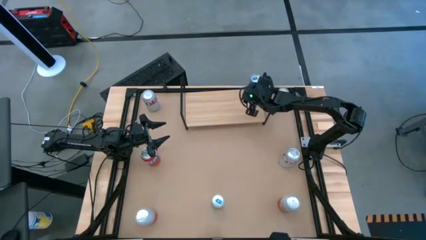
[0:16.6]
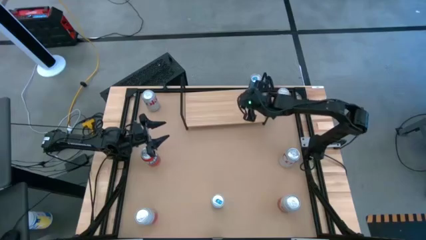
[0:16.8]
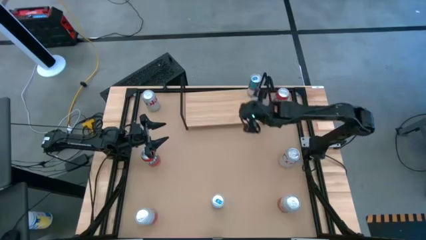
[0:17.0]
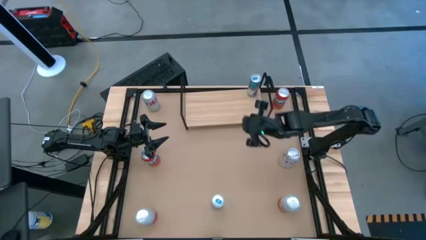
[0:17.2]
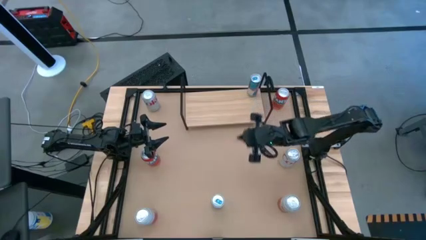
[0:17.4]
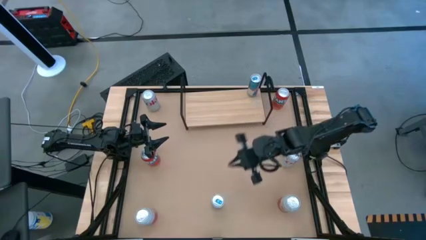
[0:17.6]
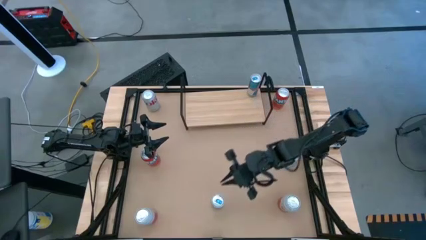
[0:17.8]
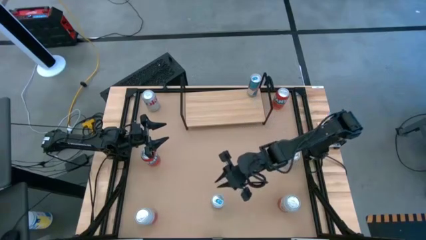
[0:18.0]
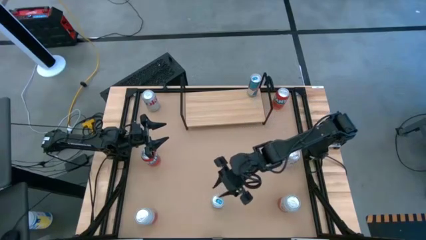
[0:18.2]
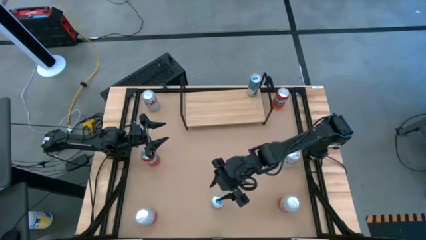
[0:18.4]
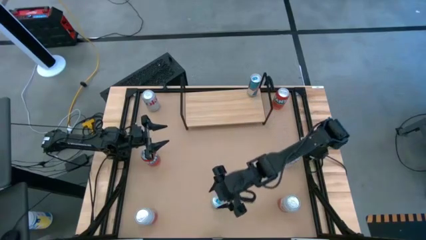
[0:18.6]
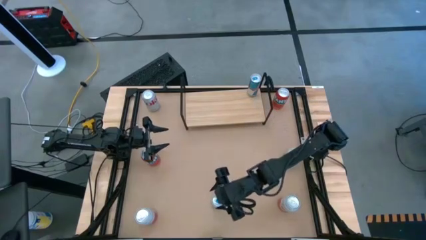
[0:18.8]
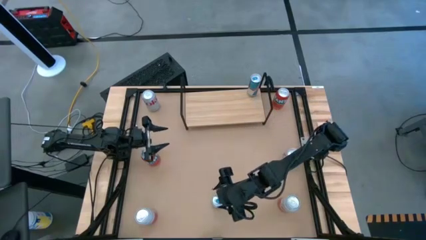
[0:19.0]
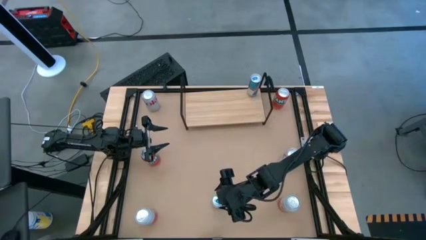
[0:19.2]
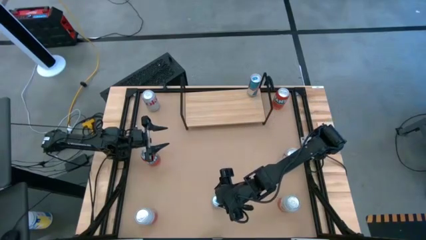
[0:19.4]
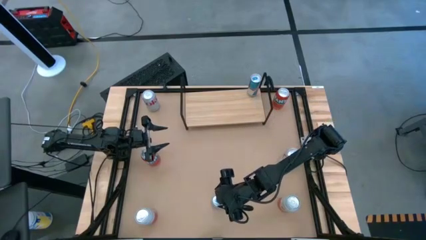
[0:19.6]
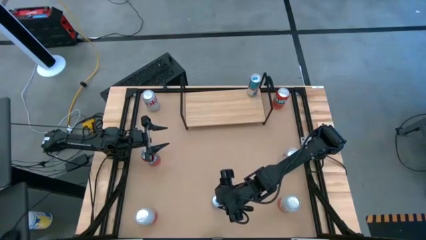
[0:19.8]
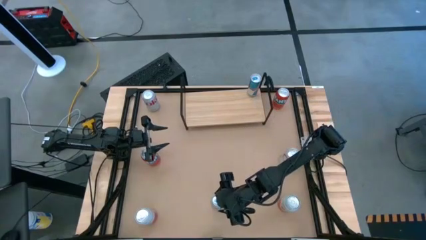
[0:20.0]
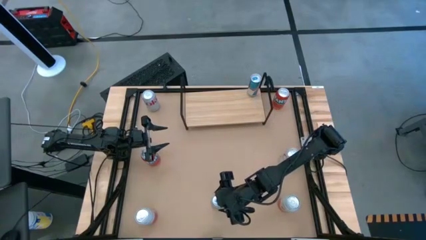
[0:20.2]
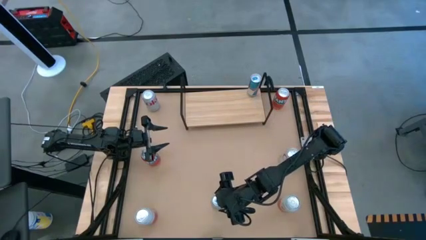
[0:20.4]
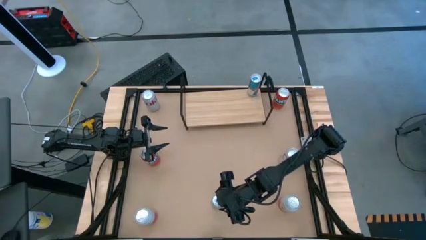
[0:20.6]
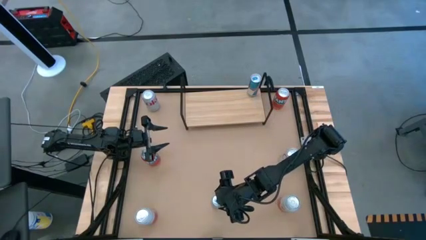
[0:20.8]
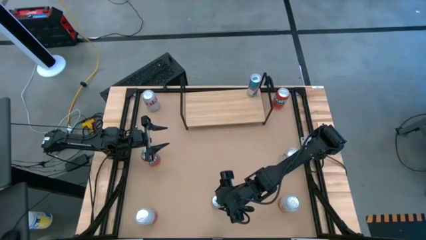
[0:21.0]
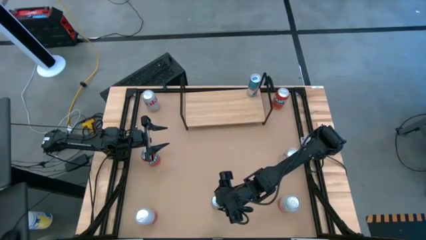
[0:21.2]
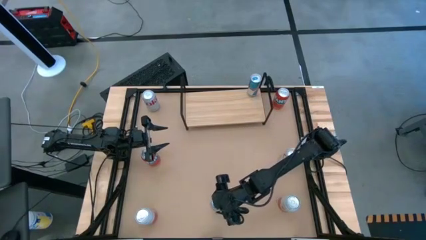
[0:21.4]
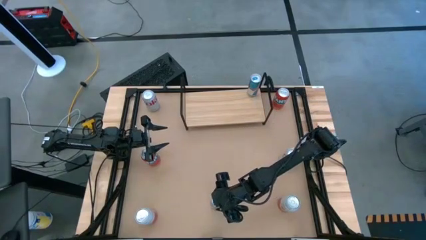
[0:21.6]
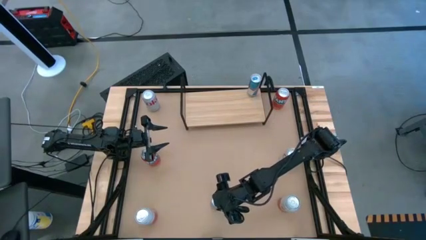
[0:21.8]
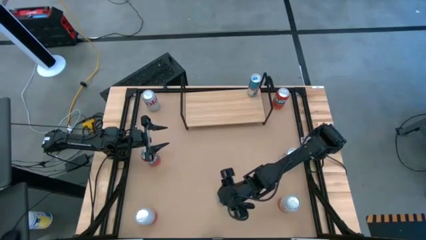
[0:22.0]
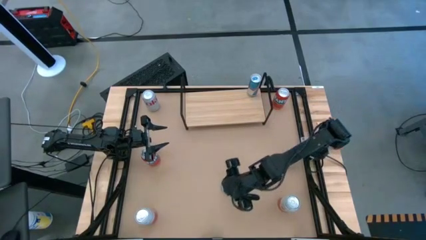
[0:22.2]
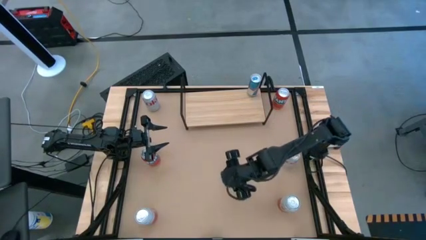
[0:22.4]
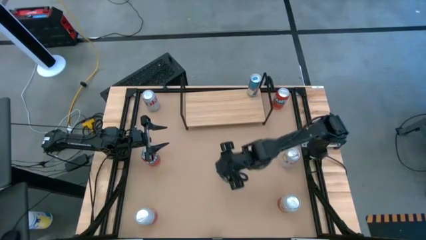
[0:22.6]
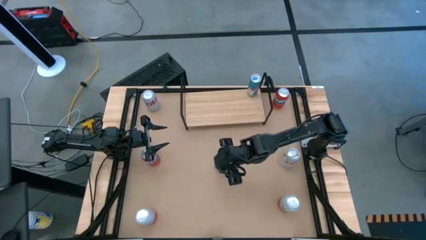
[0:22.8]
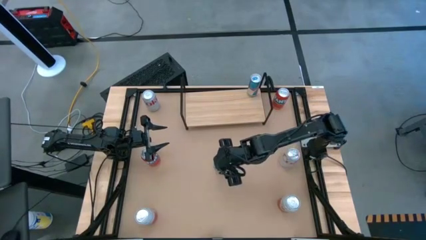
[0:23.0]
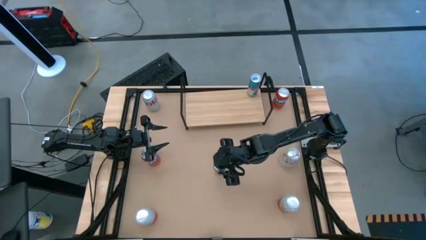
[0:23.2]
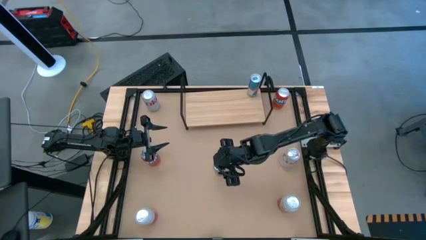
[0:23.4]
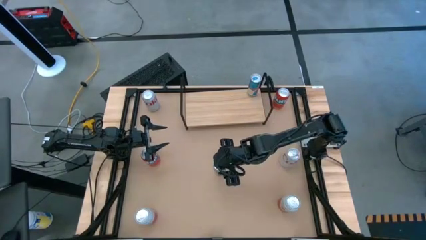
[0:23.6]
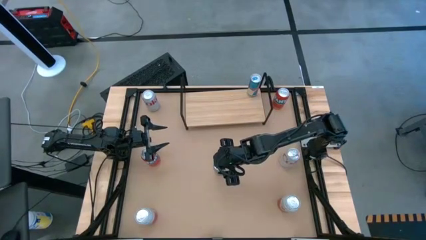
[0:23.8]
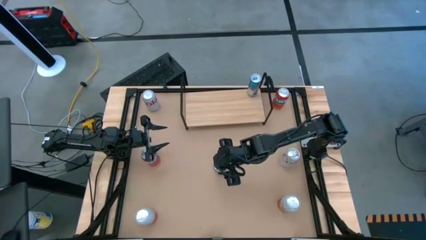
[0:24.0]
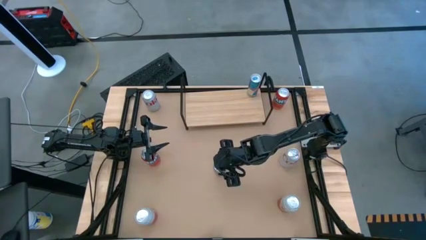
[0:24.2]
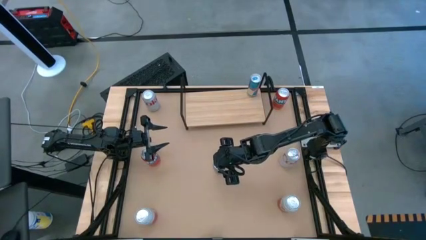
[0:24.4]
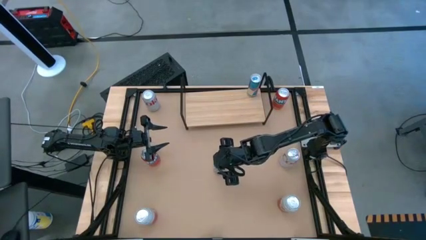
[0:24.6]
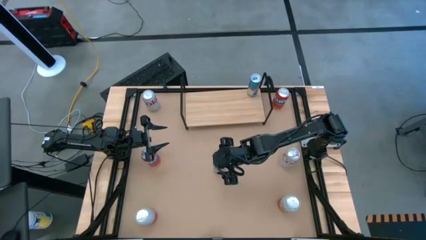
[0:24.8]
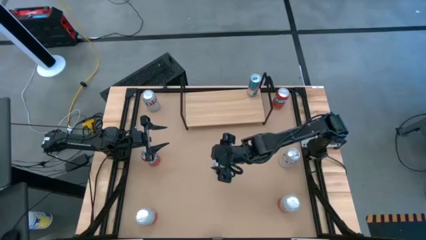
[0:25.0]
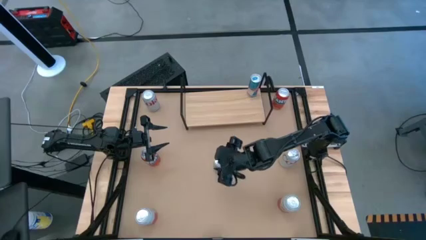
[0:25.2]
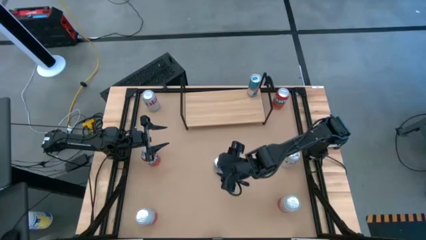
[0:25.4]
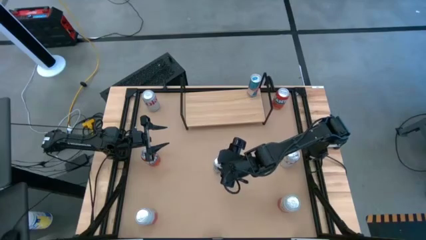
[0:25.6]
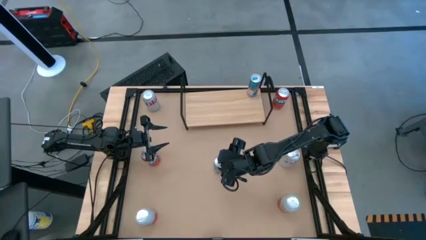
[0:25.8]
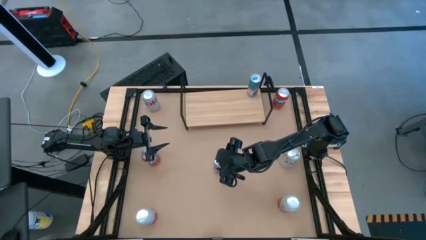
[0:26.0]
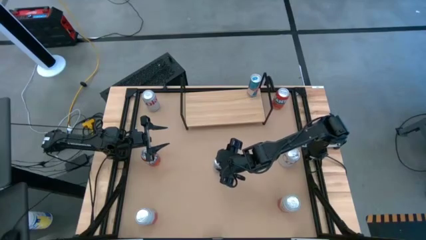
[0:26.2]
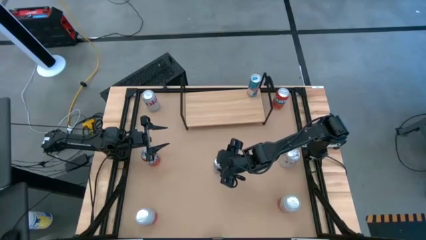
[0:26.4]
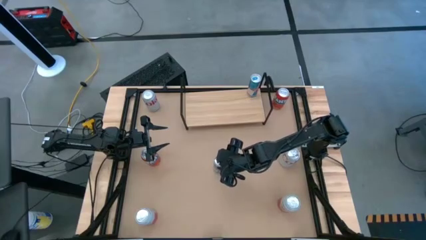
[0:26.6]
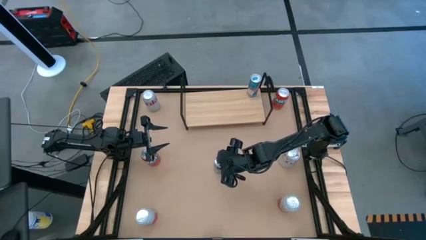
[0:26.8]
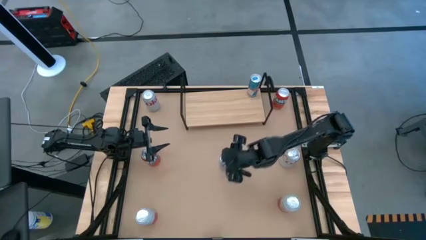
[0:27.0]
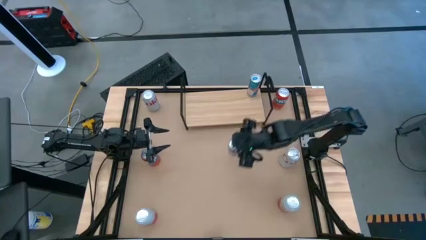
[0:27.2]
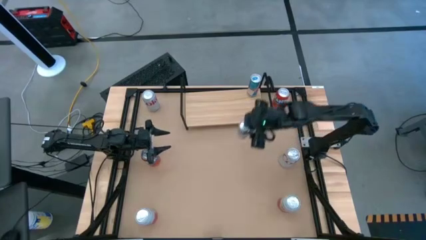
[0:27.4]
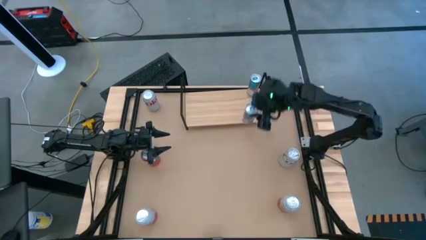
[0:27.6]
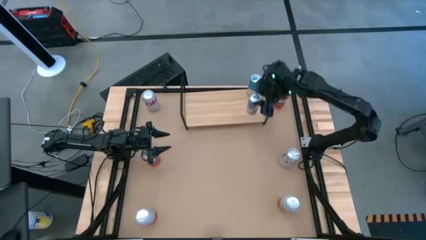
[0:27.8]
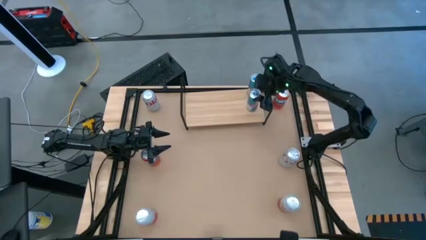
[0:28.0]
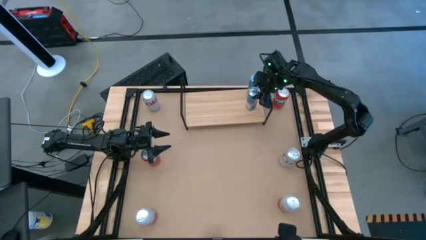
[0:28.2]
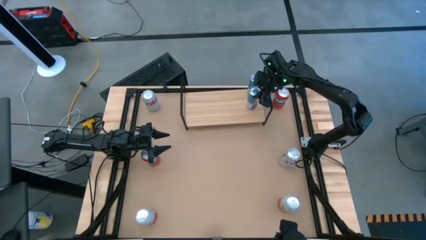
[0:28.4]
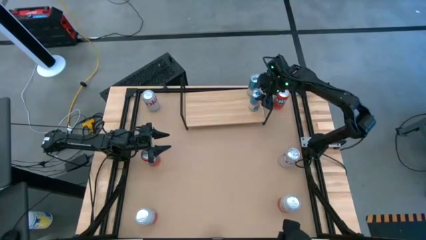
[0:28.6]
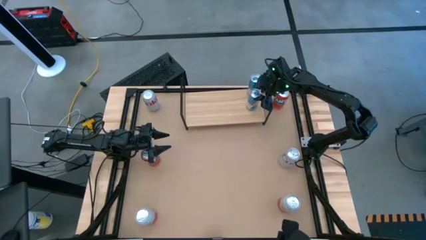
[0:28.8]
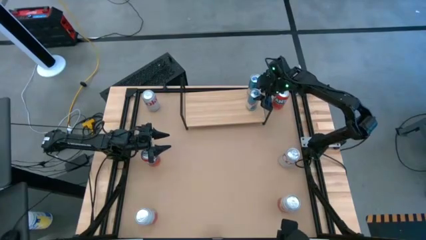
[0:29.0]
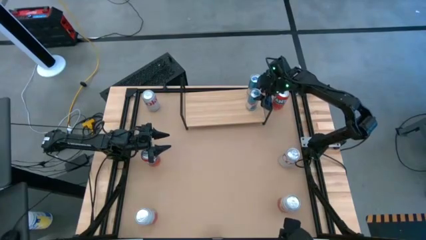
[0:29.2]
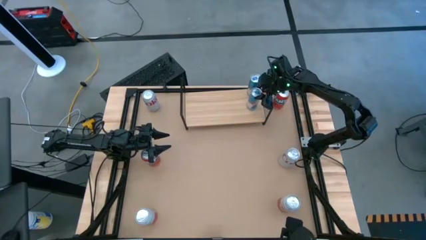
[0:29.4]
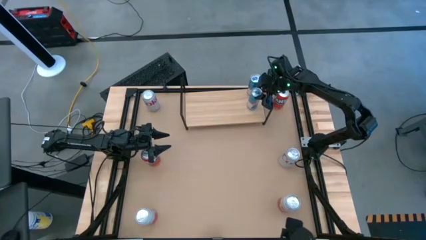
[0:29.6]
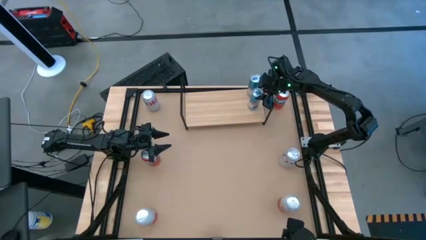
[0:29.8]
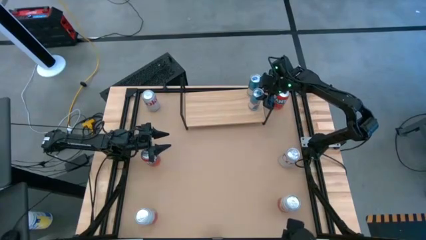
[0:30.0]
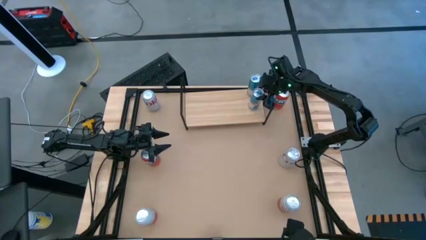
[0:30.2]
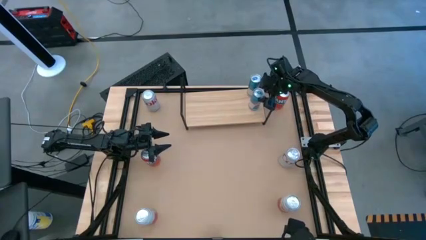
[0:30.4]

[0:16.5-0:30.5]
Task: Place canned beverage on shelf
Put the blue soda can on the shelf aligned with the other blue soda can on the shelf

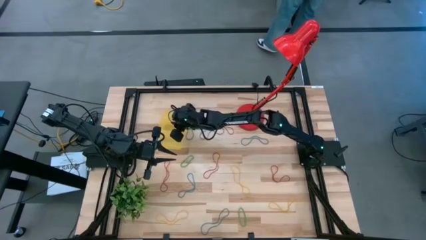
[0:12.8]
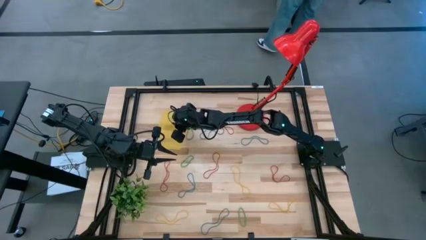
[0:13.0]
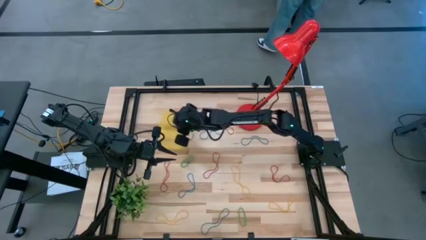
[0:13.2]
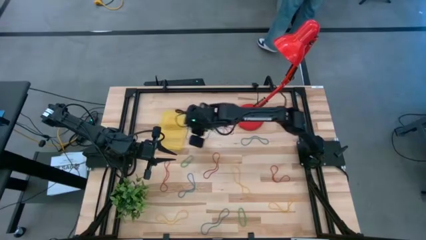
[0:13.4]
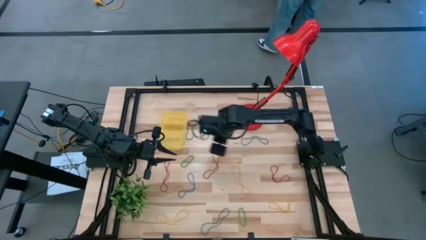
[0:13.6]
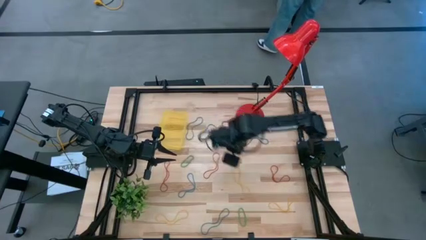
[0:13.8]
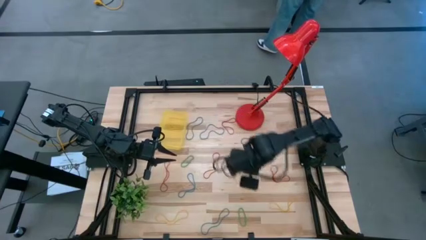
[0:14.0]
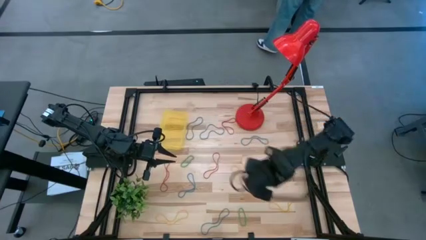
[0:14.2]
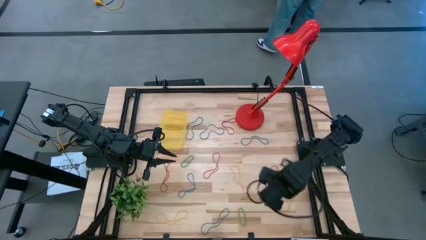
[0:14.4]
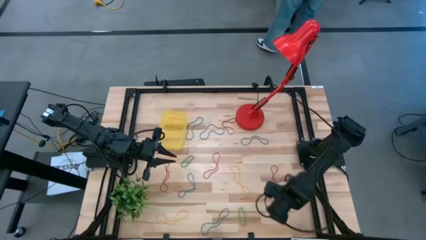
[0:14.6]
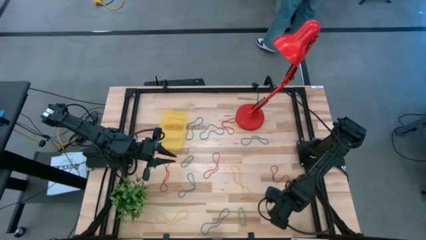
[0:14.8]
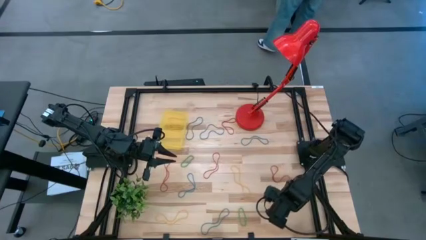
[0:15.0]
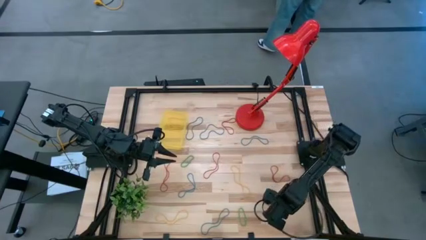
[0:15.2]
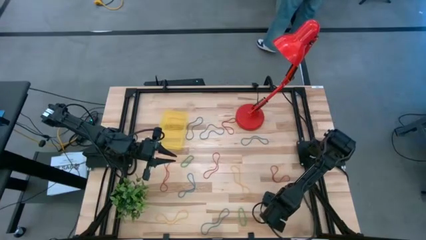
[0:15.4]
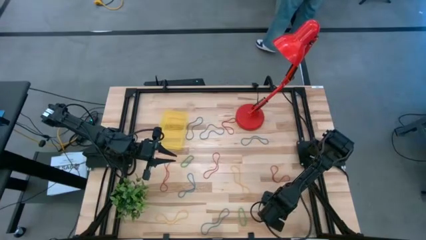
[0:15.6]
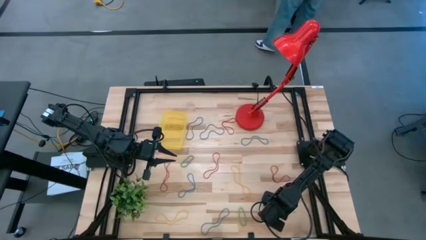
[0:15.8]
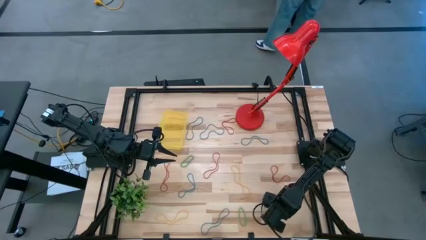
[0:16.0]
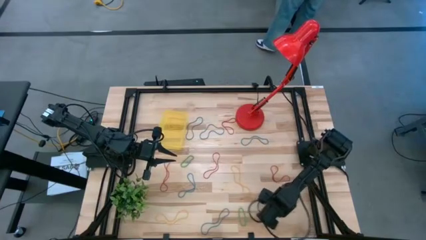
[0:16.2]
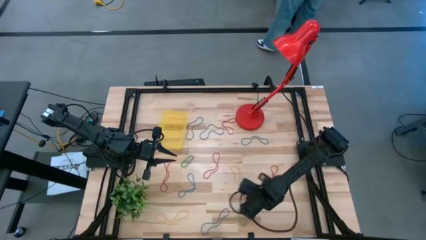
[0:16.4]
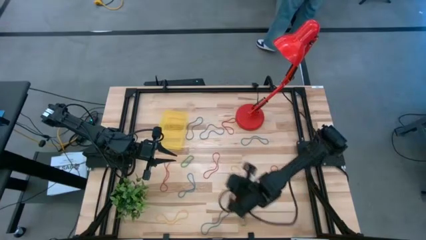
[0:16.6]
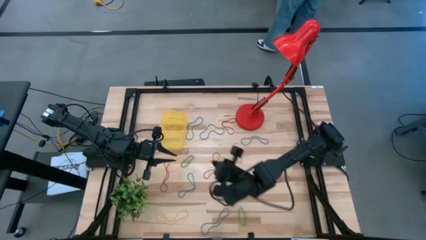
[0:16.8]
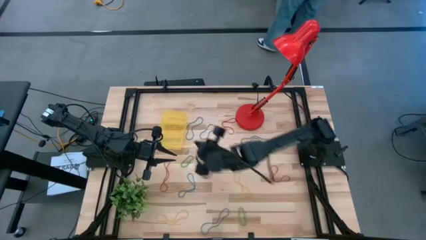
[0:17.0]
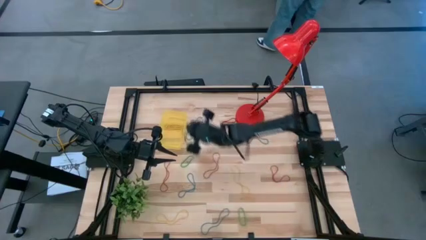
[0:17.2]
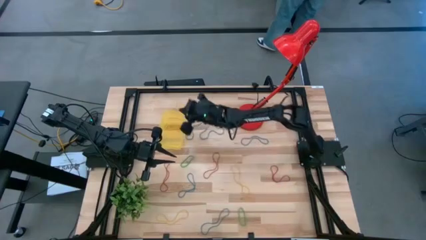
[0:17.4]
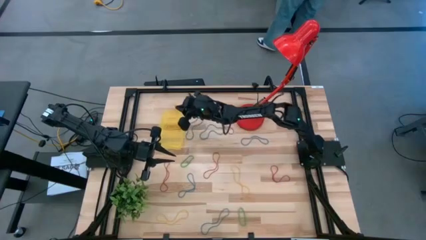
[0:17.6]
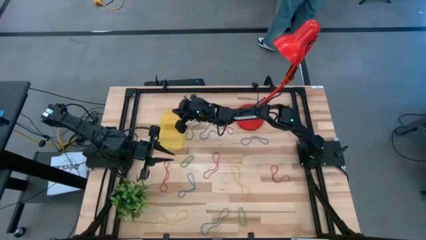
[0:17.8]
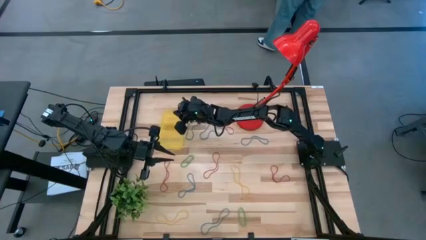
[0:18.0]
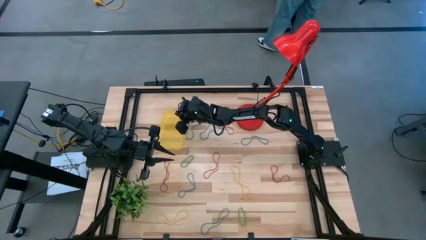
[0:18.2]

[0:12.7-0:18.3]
Task: Pick and place items into bin
Put the yellow rubber band into the yellow bin
